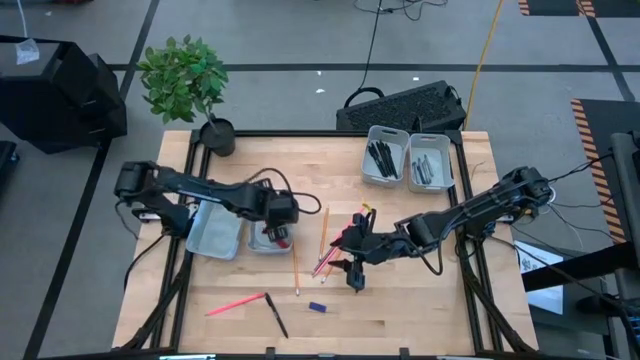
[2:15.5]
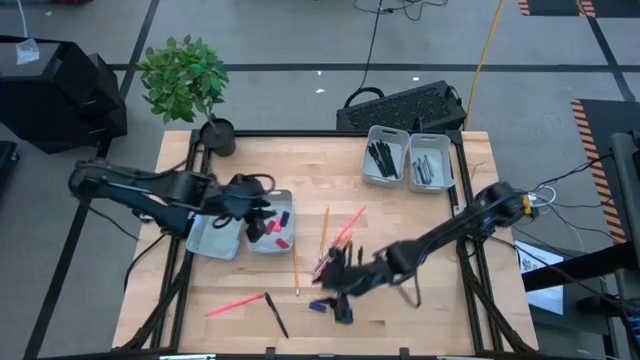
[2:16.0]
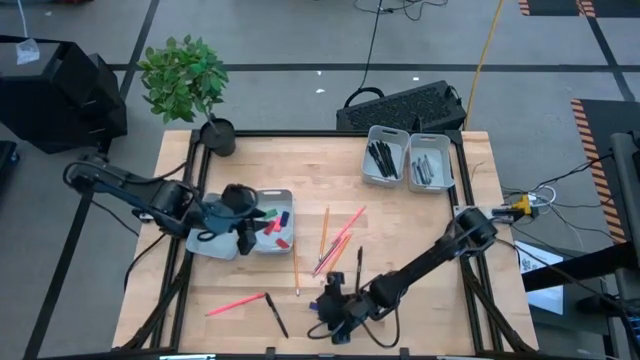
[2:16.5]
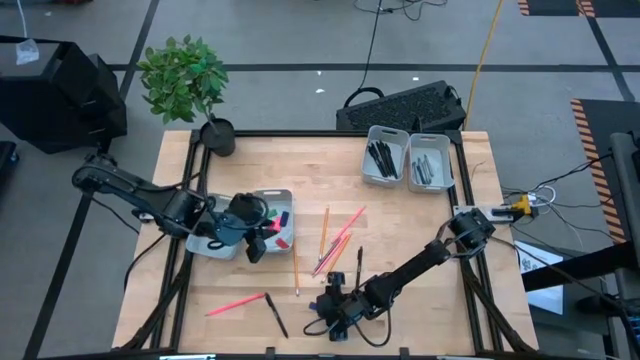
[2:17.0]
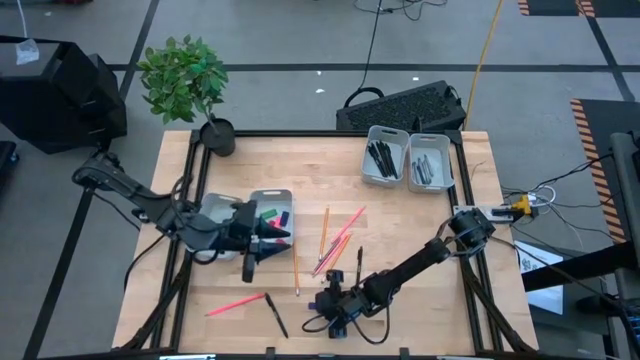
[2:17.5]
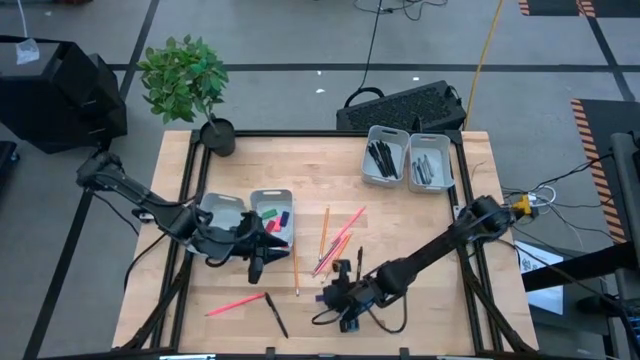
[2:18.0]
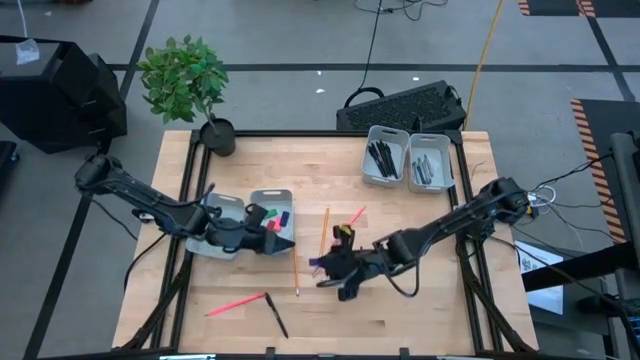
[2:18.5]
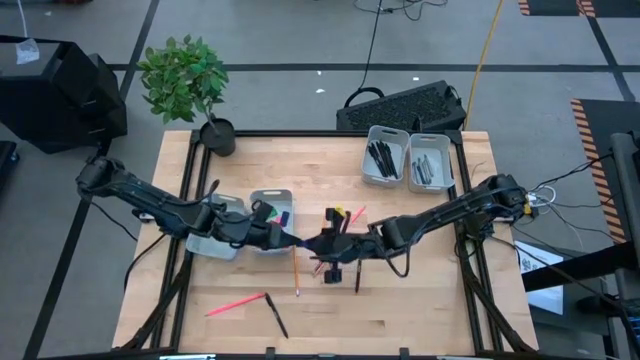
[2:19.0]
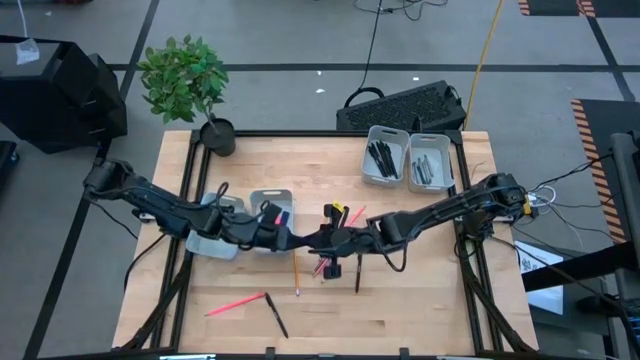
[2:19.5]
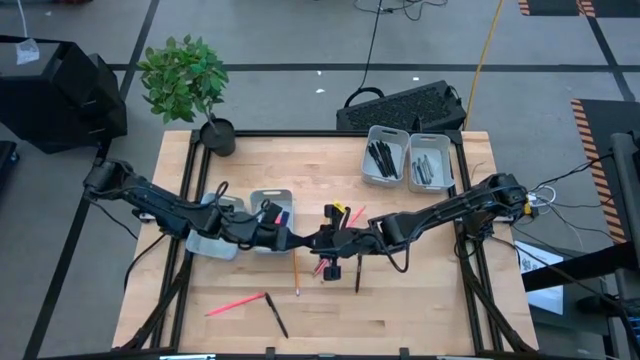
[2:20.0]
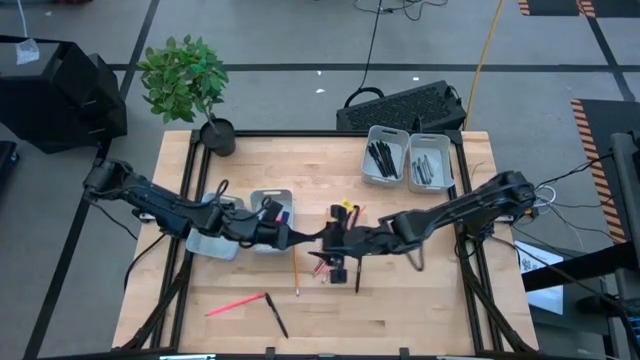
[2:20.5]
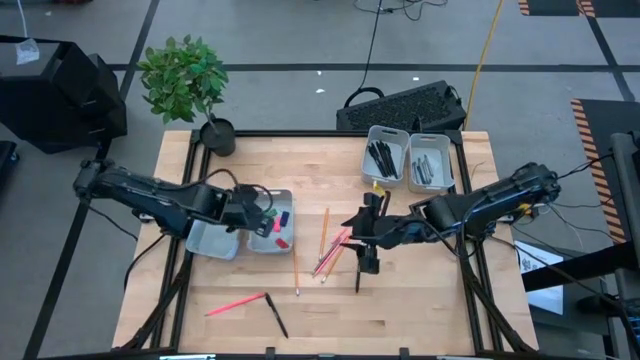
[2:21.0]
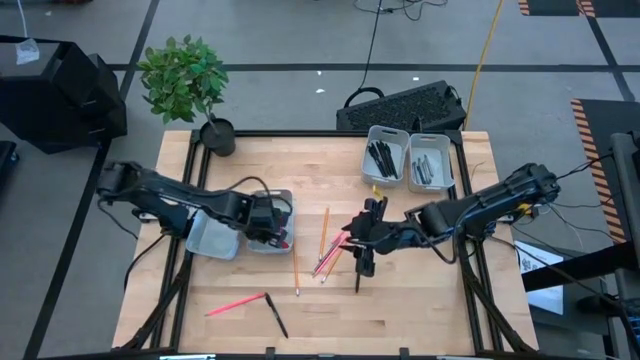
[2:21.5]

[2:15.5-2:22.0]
Task: Sort crayons/erasers/pens/pencils in bins
Put the blue eraser into the bottom right gray bin

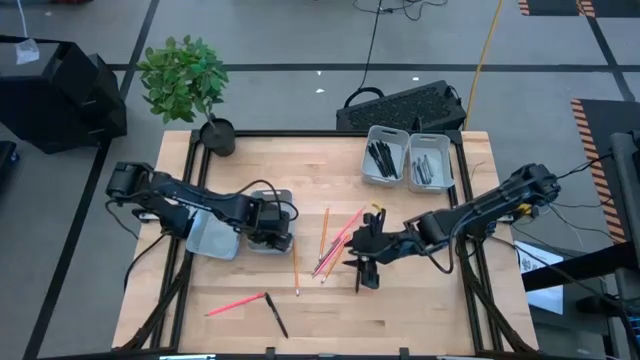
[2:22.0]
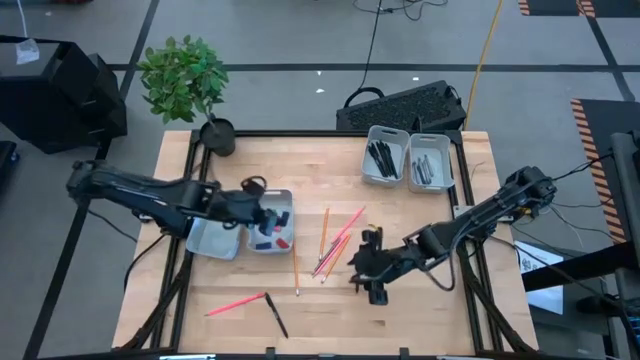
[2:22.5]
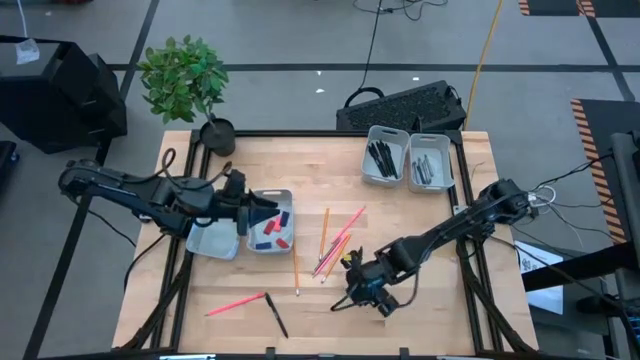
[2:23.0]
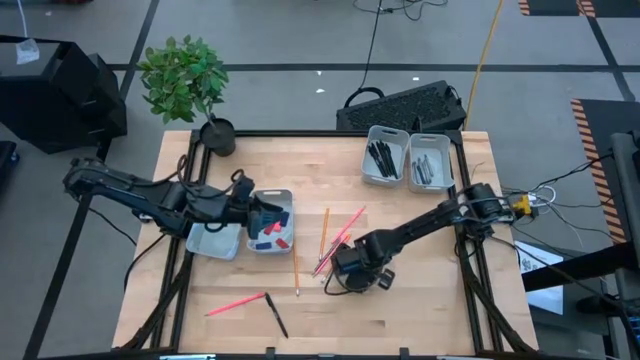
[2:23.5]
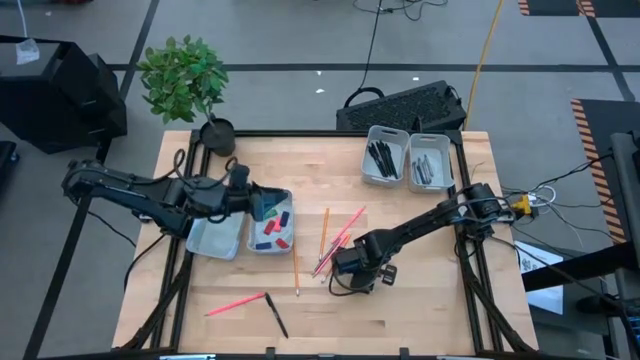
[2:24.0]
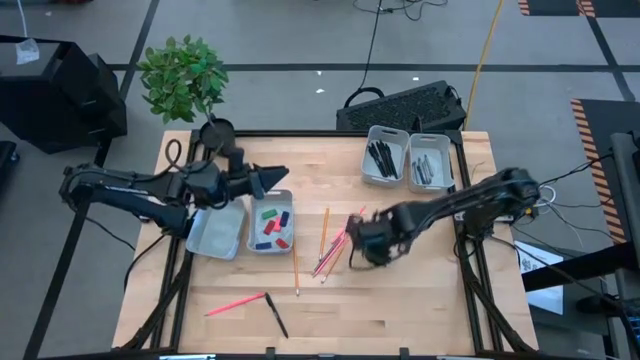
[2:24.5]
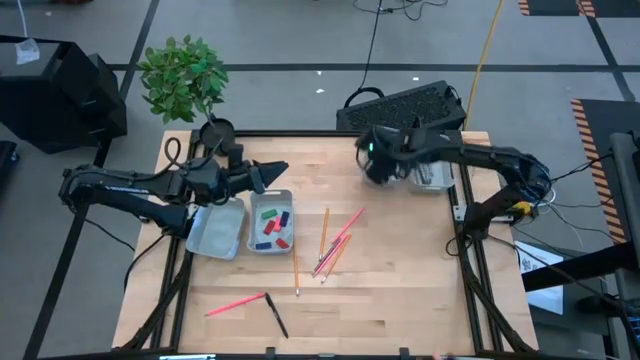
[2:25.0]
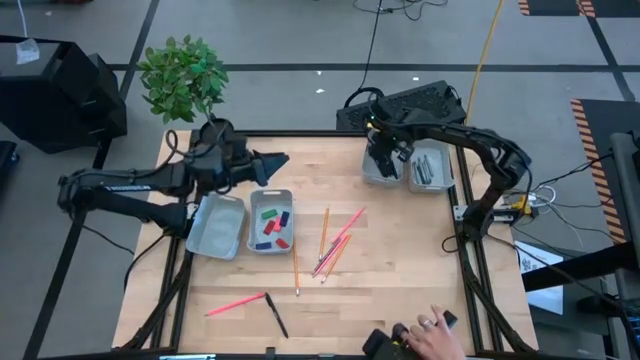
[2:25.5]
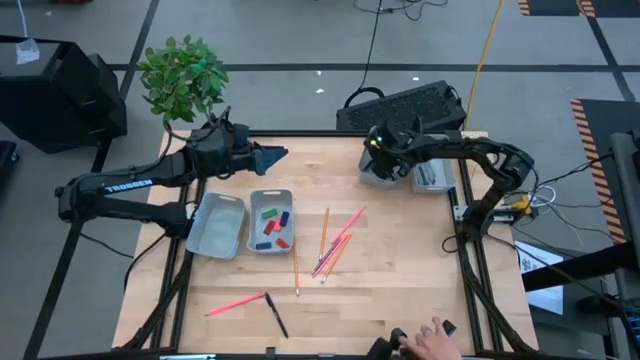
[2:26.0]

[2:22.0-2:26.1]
Put the black pen into the top left gray bin

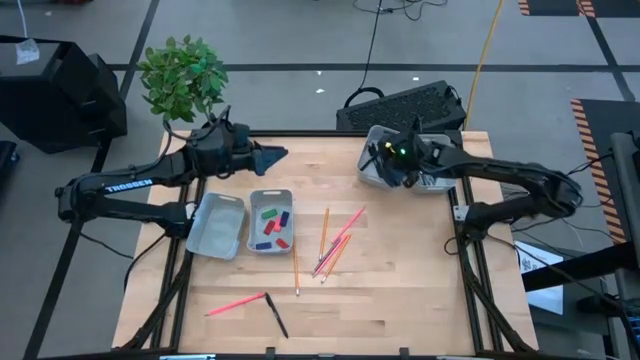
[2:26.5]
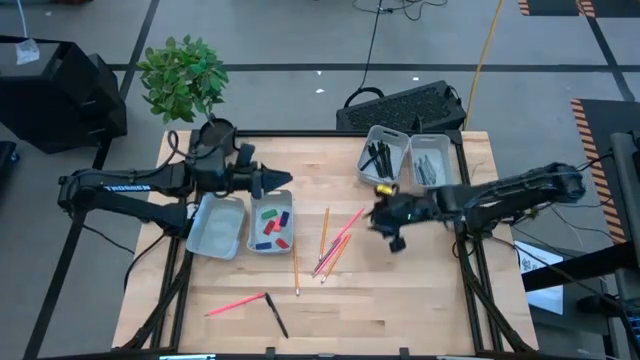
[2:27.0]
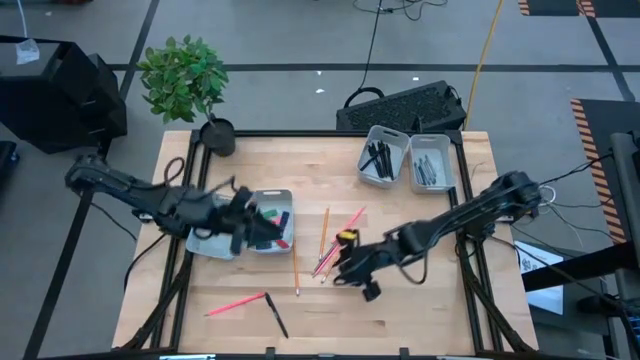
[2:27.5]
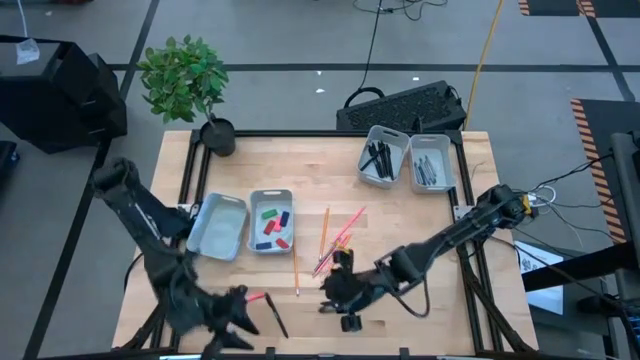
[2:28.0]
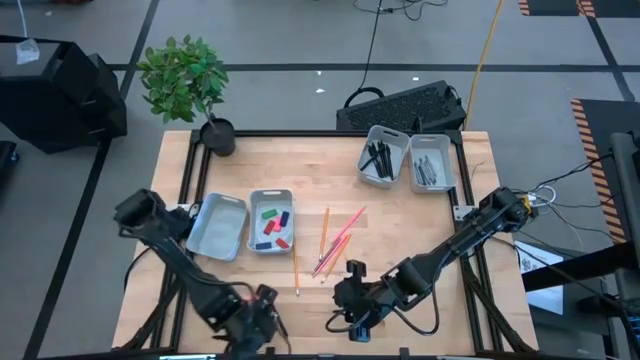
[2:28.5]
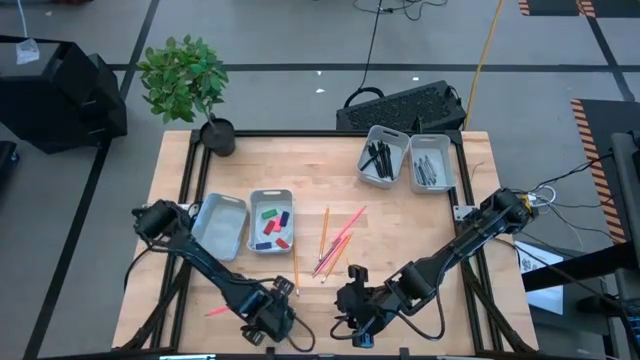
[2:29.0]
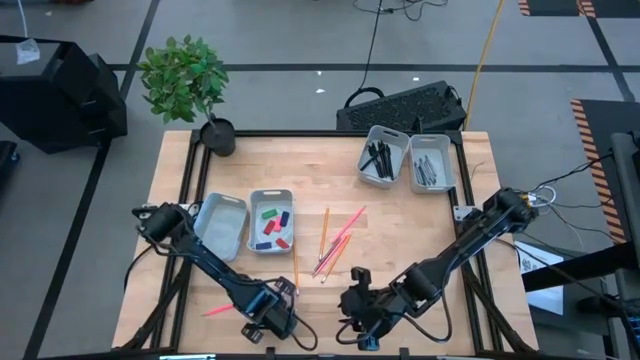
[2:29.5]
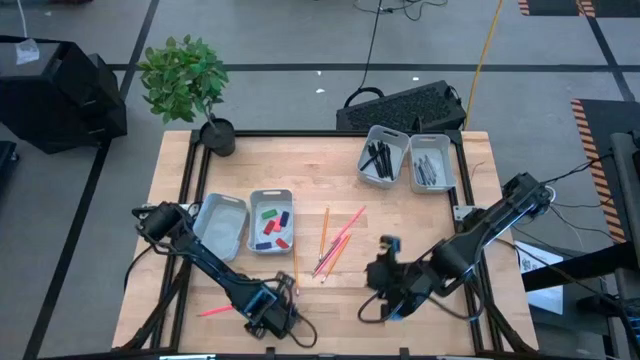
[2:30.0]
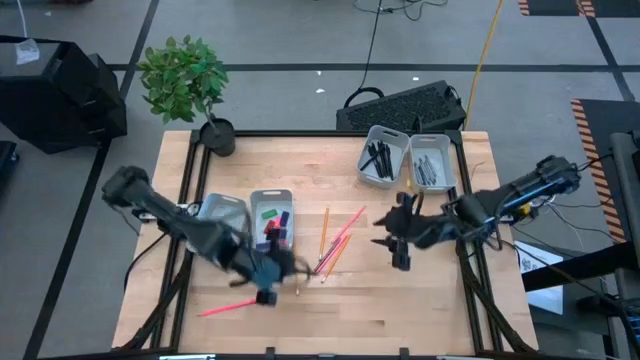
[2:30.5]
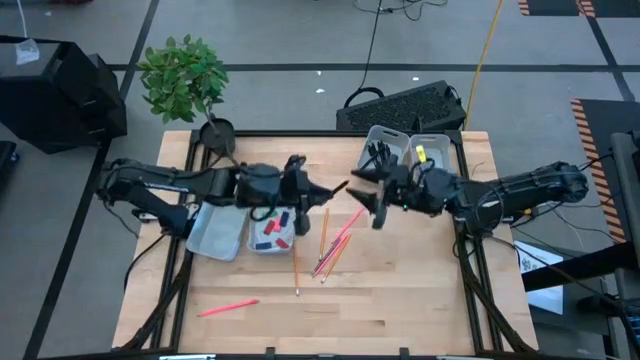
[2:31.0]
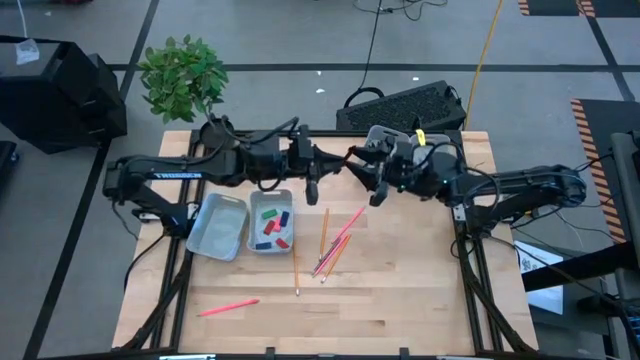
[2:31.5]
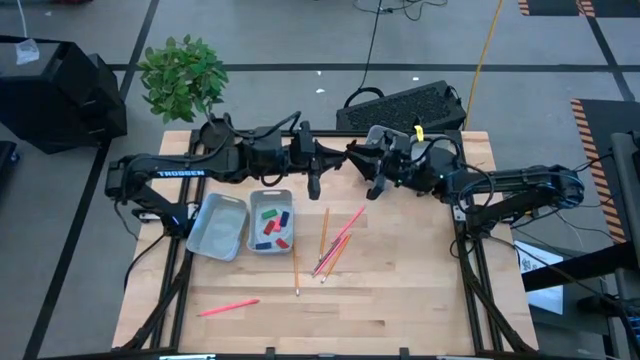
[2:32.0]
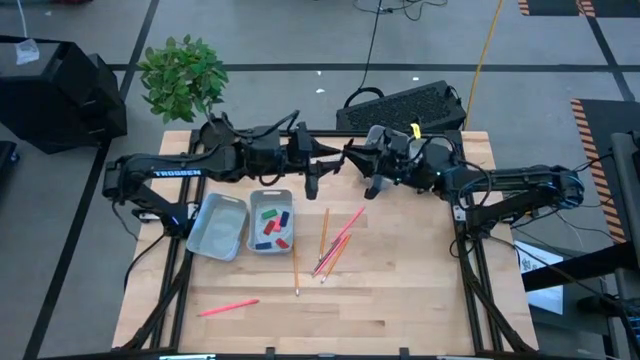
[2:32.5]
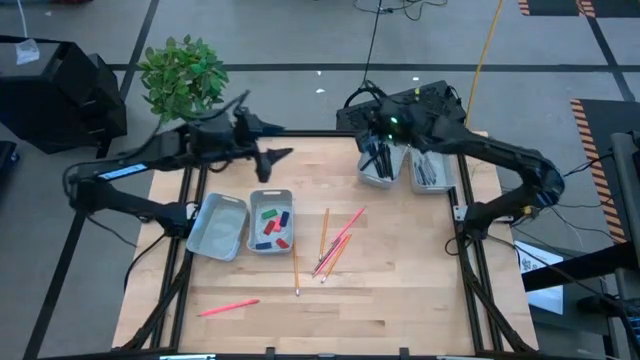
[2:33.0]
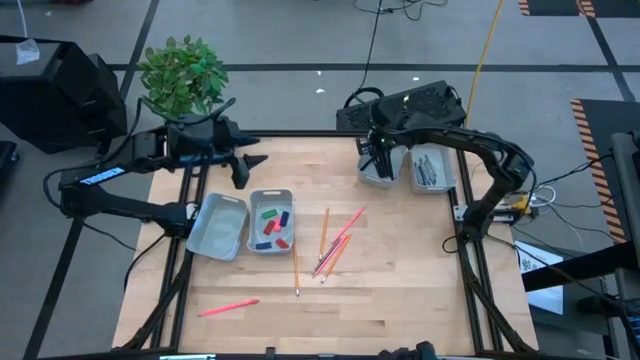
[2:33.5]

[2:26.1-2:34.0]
Put the black pen into the top left gray bin

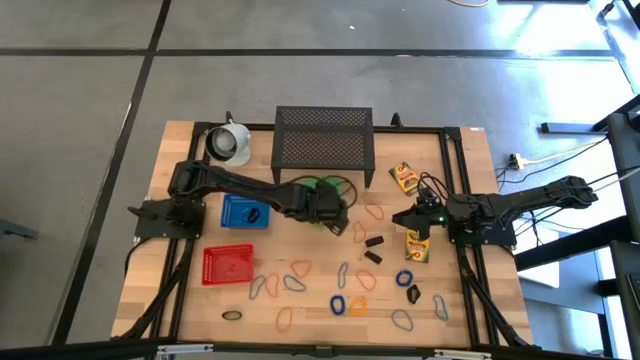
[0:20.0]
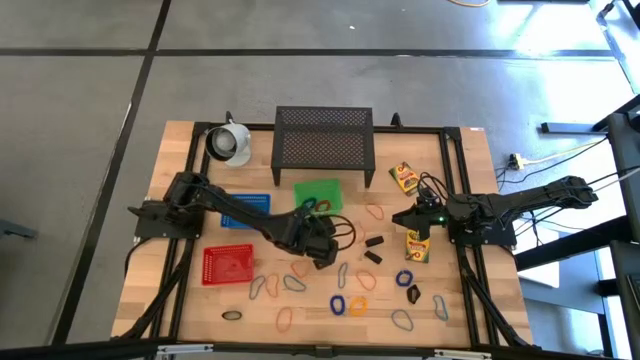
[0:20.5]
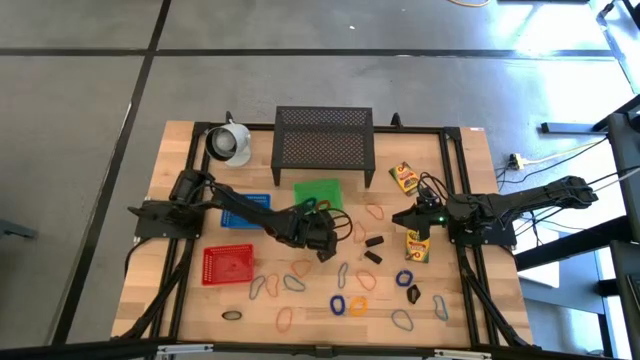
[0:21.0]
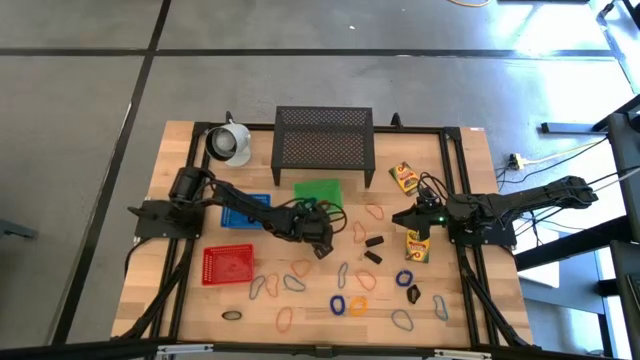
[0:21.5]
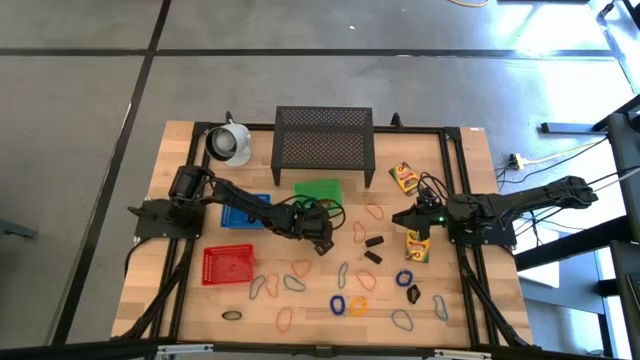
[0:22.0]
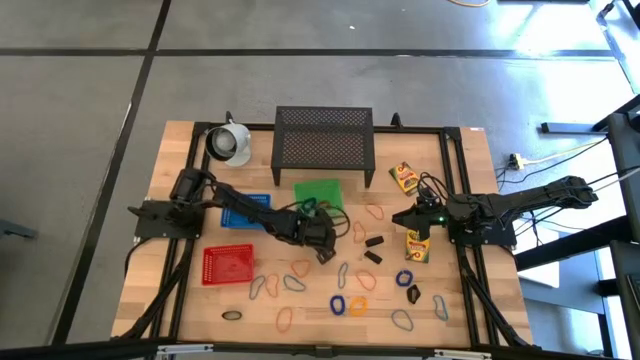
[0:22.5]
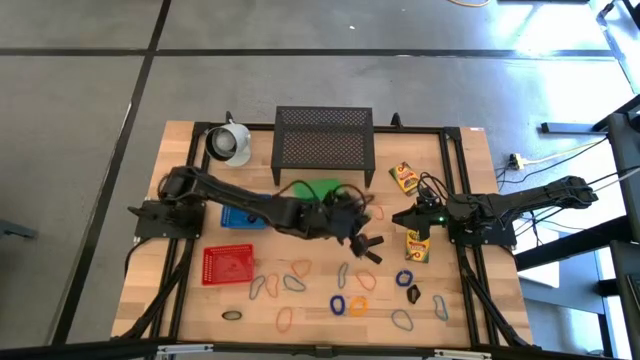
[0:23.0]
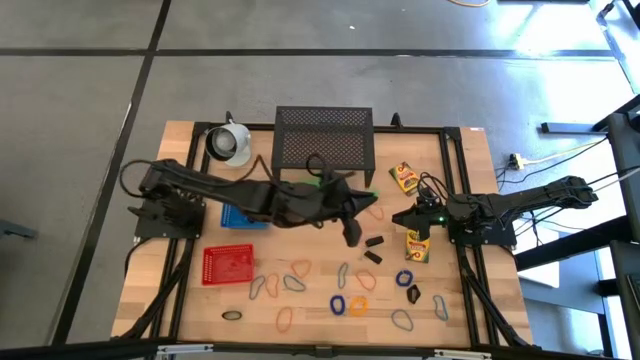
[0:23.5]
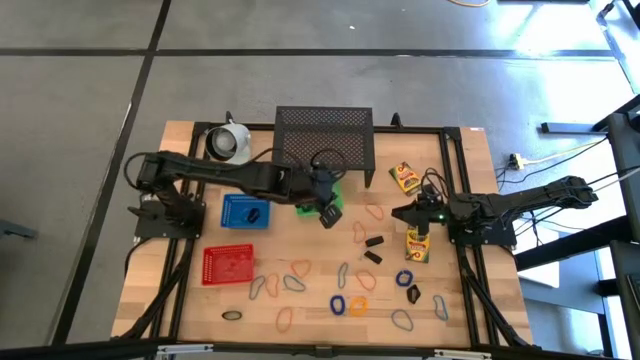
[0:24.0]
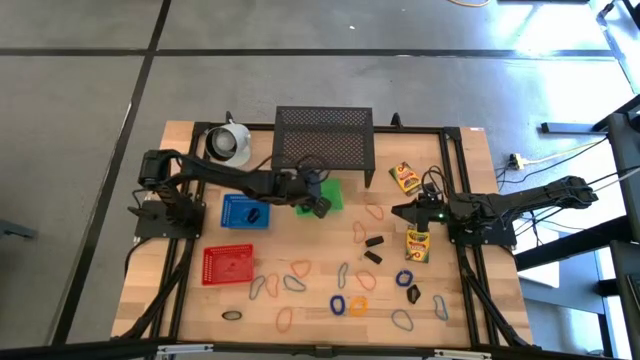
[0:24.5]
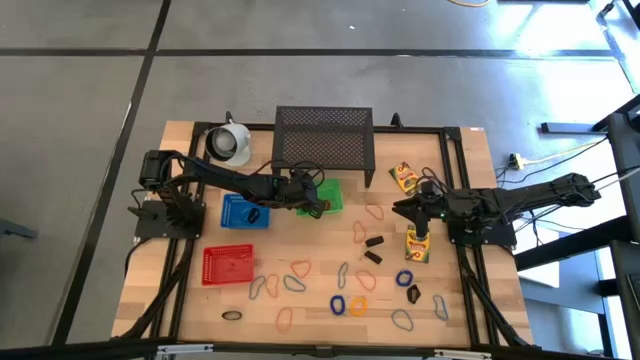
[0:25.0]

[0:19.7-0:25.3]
Task: Pick & Place Office Desk Supplies
Put the green spring keychain into the green bin
